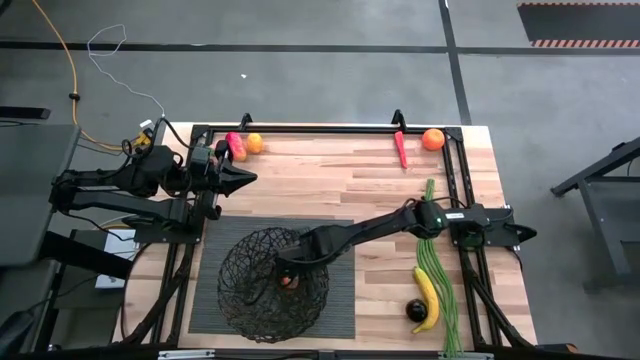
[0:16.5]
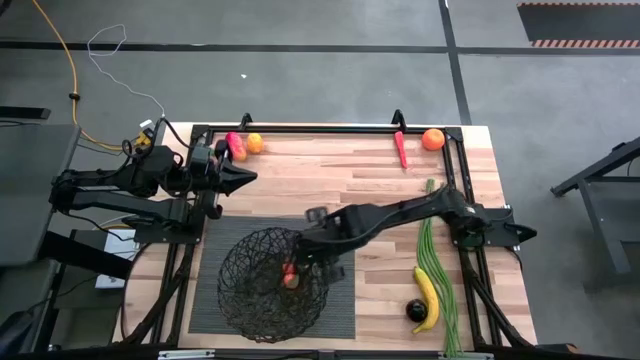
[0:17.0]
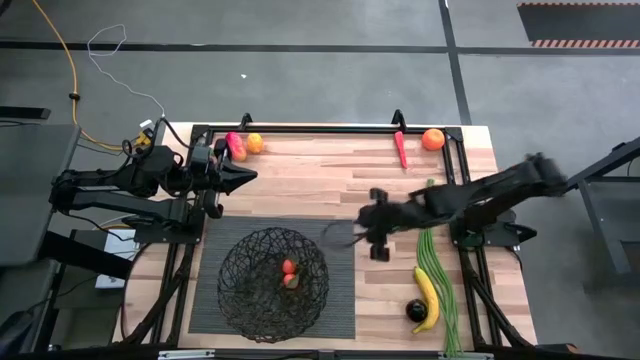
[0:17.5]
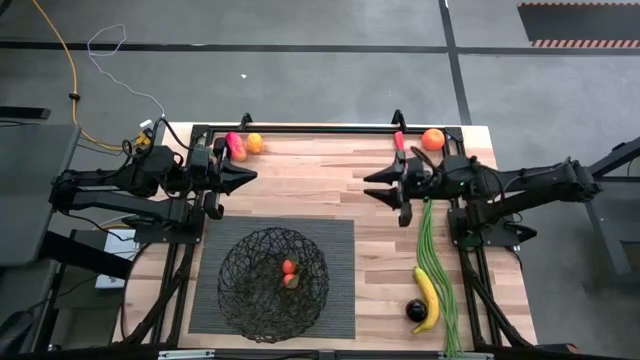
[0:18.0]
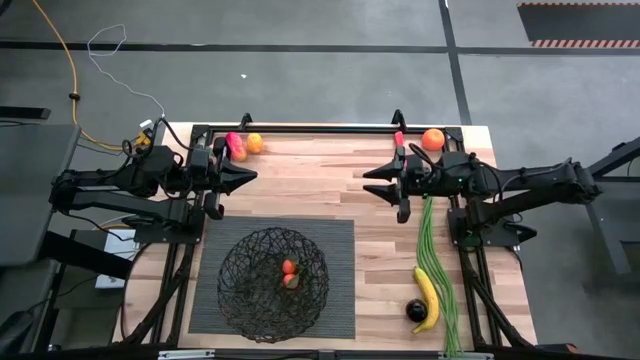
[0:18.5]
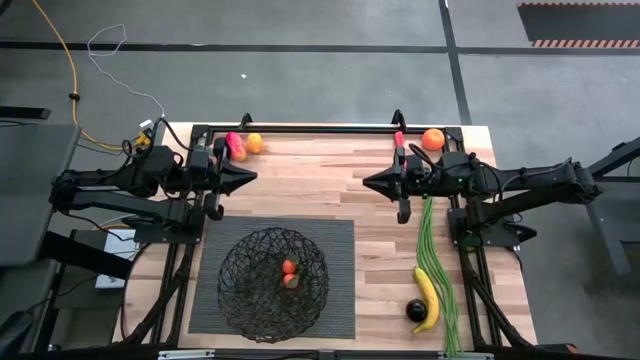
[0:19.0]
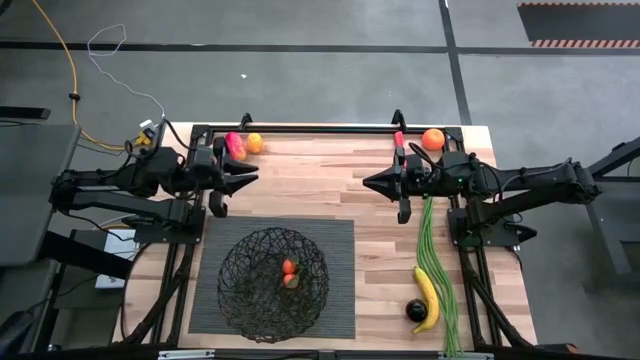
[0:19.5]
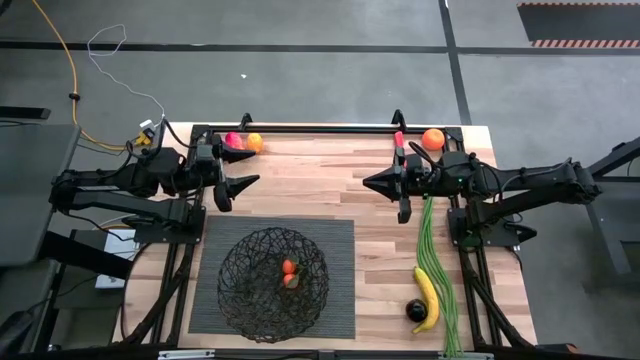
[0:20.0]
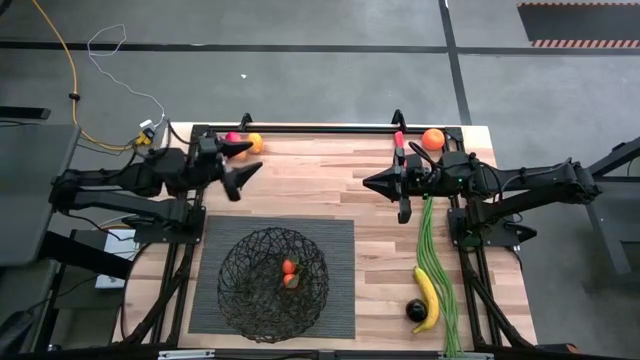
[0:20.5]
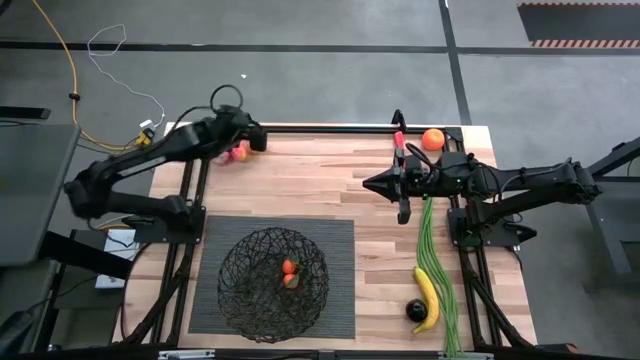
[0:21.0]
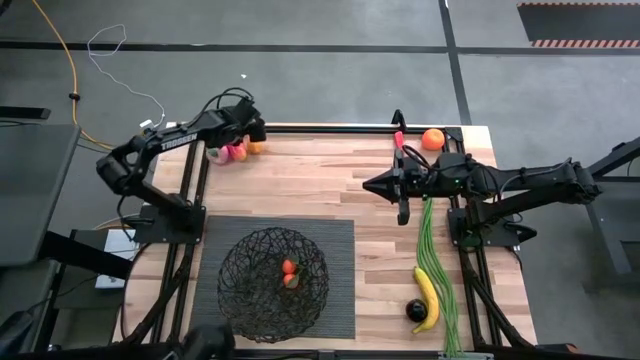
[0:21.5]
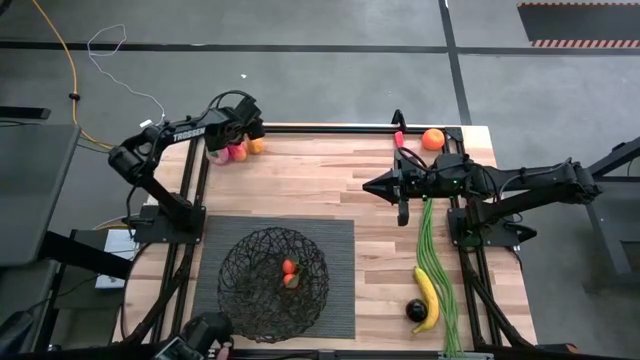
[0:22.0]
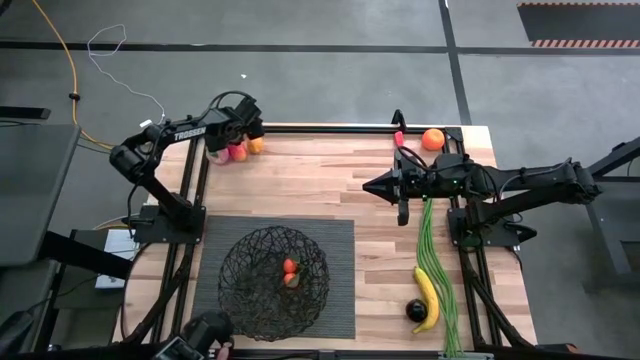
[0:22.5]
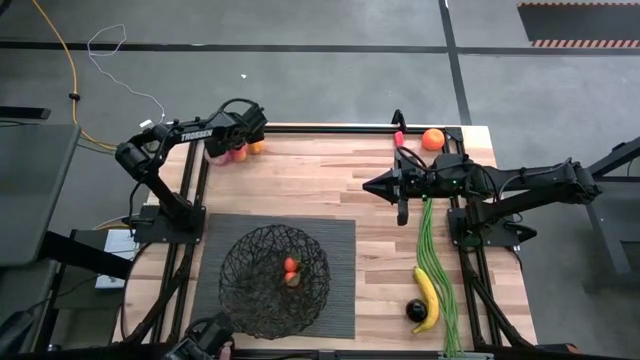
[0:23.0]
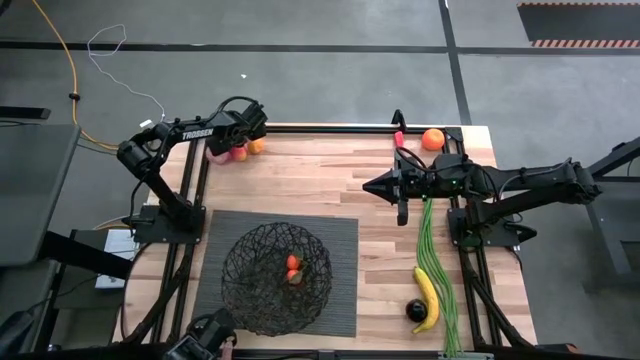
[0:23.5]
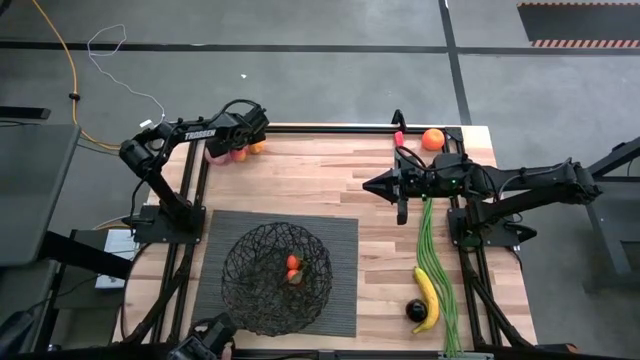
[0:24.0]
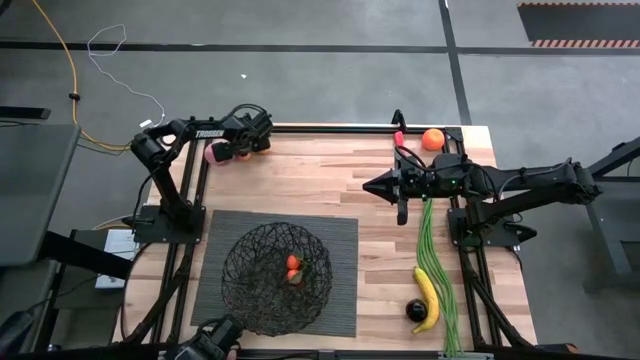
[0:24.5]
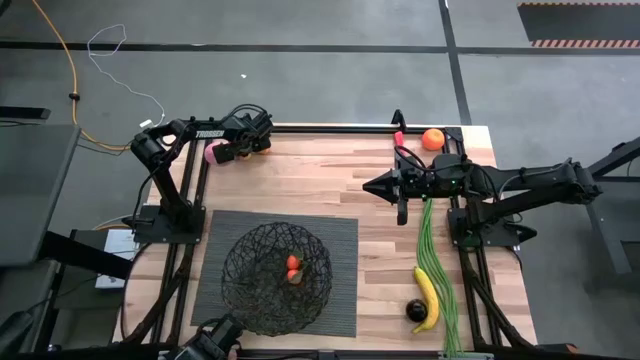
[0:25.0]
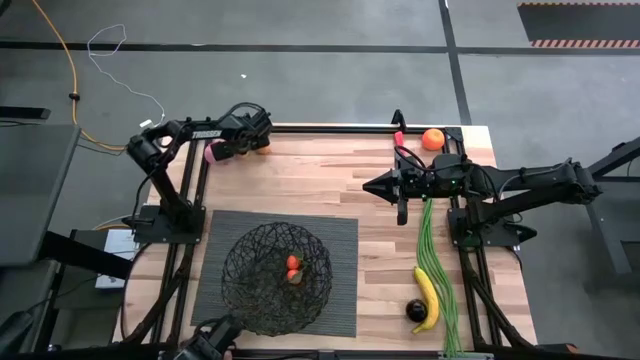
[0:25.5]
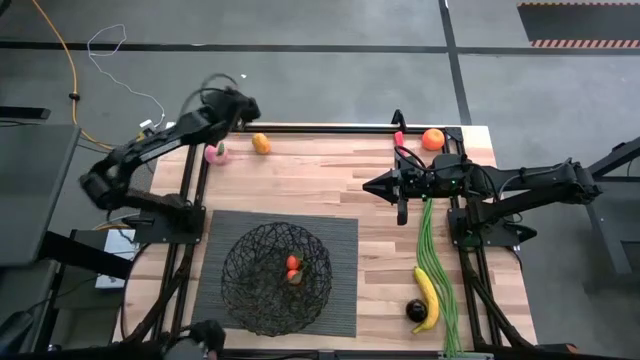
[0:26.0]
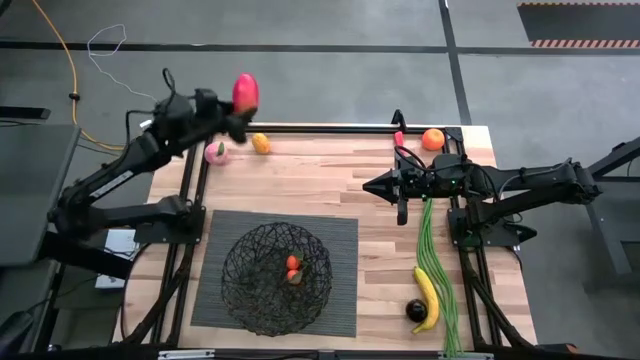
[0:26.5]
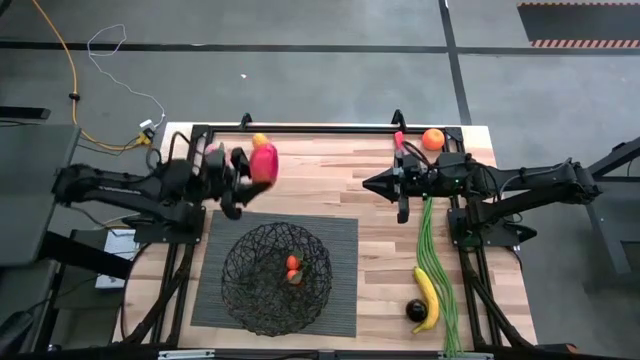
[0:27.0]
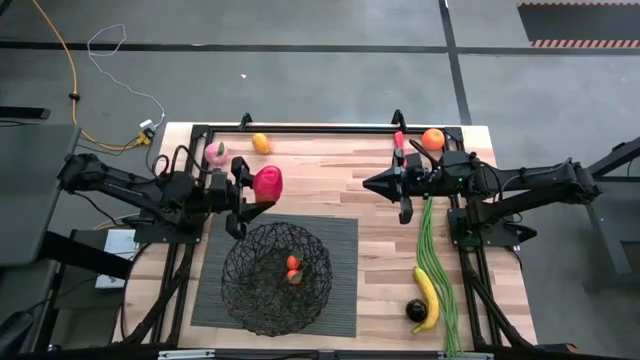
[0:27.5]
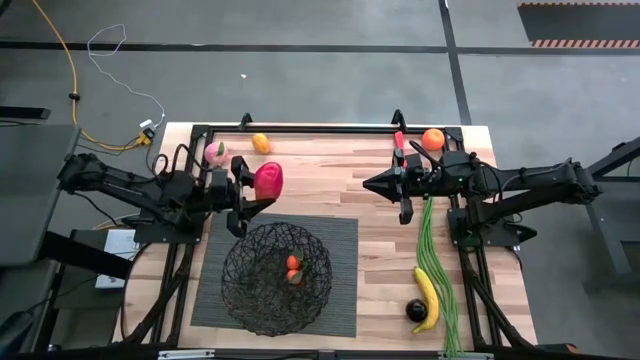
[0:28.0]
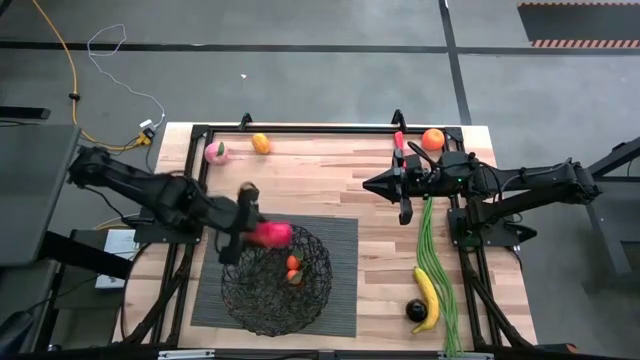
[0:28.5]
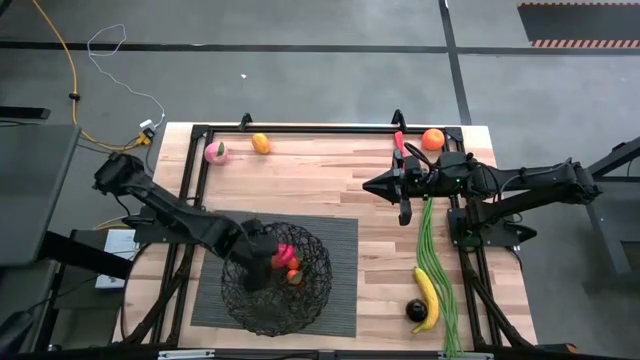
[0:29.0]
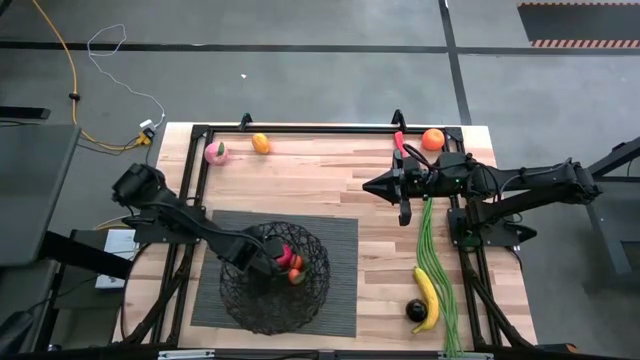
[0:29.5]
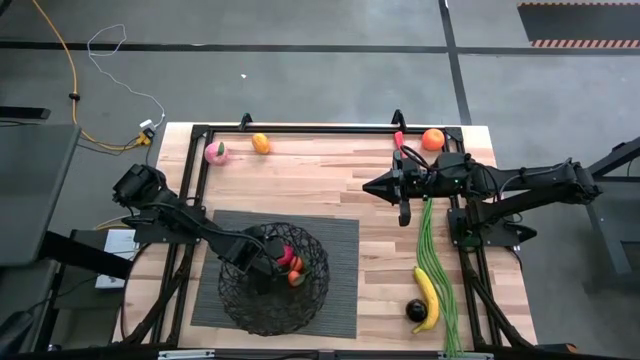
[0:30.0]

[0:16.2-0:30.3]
Task: Build produce basket
Put the red mango into the black wire basket

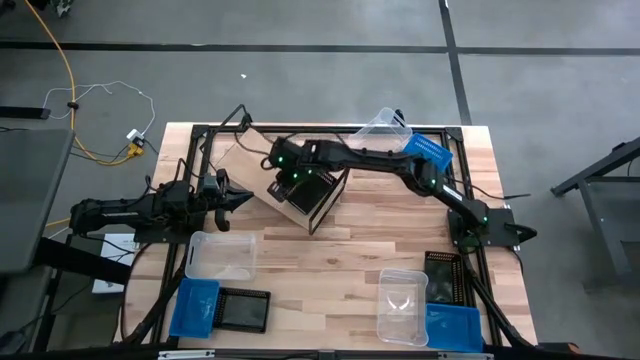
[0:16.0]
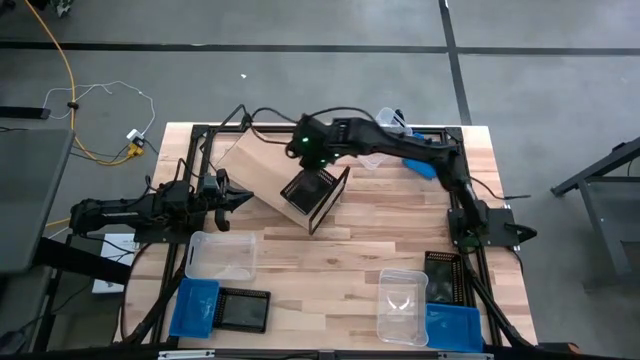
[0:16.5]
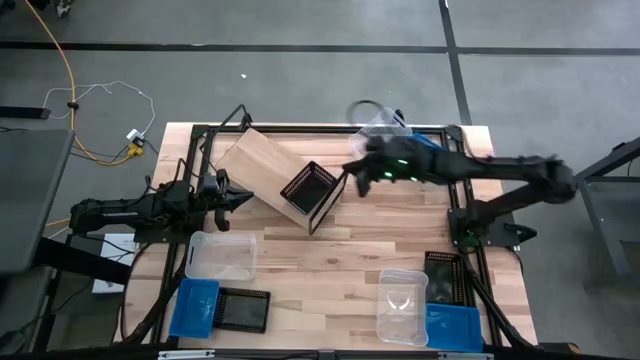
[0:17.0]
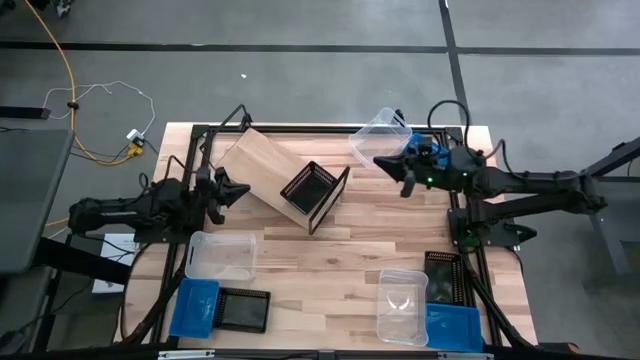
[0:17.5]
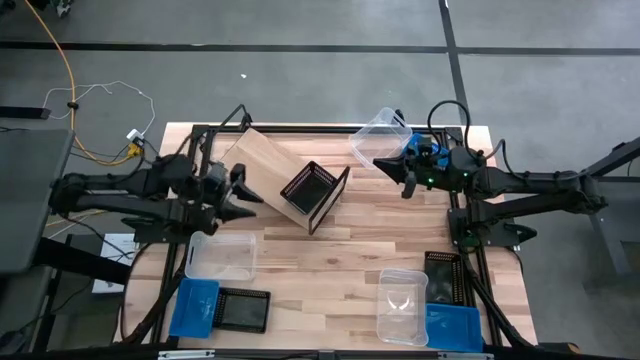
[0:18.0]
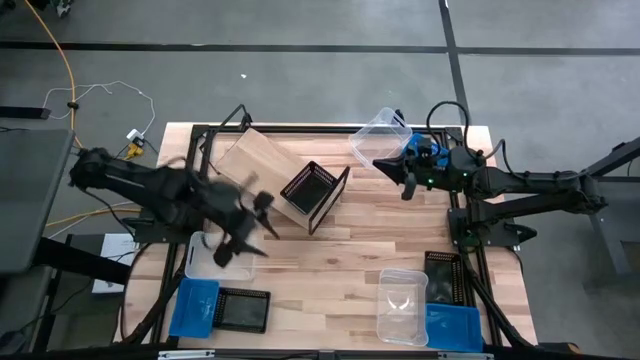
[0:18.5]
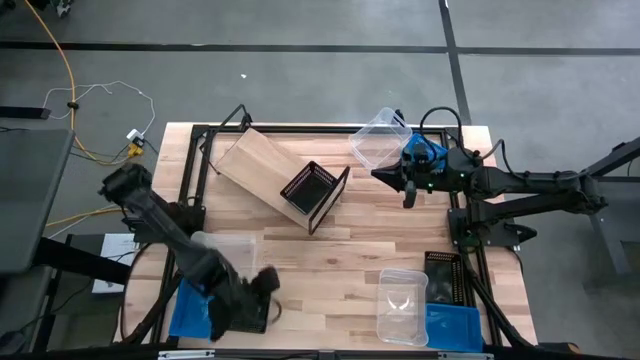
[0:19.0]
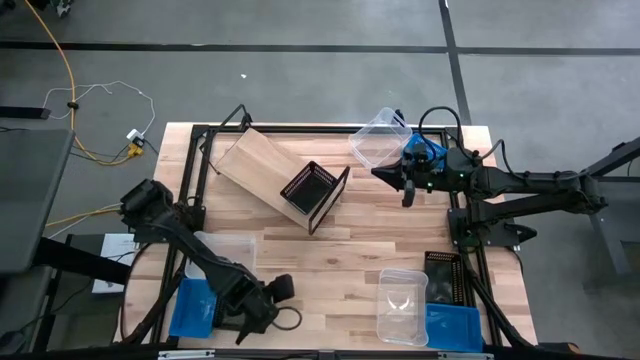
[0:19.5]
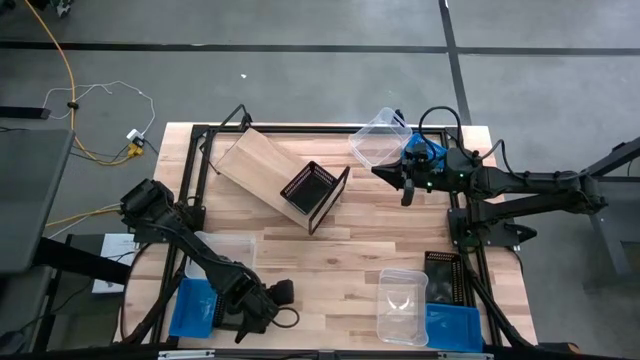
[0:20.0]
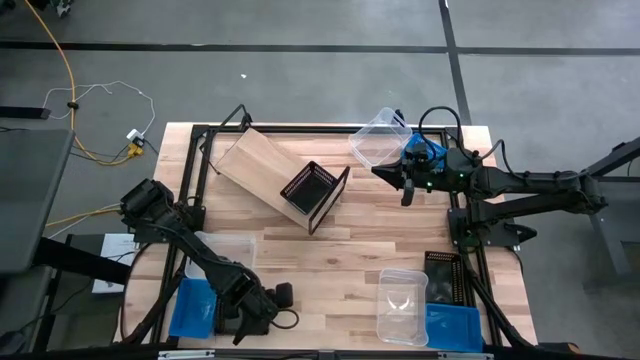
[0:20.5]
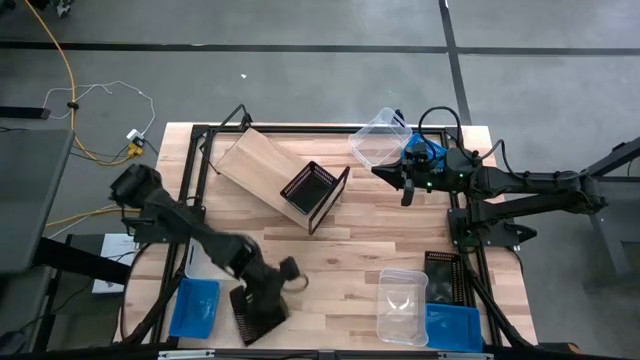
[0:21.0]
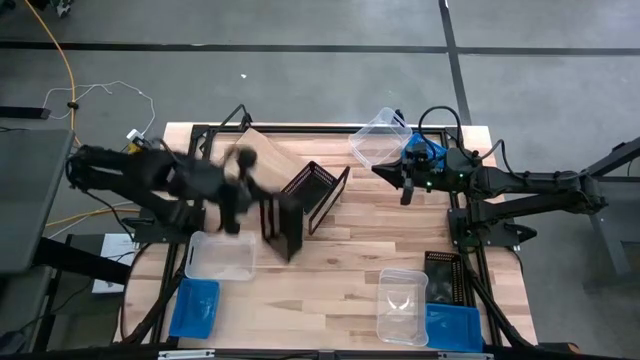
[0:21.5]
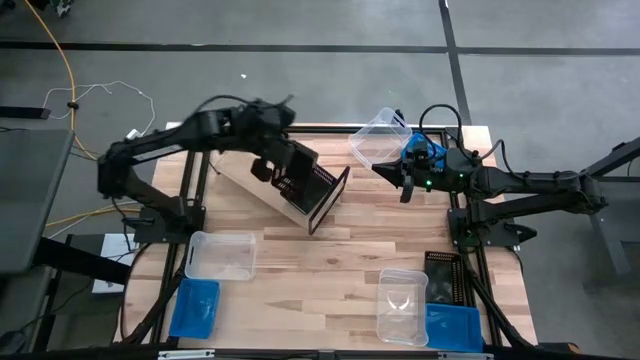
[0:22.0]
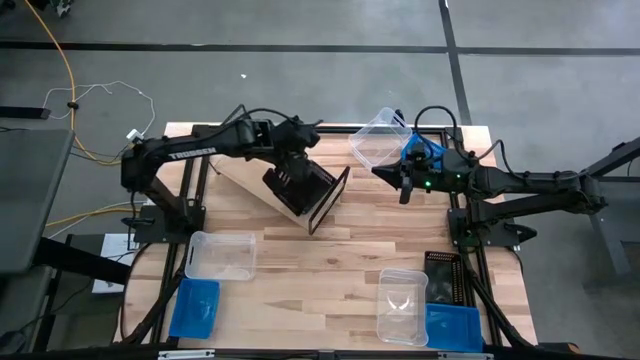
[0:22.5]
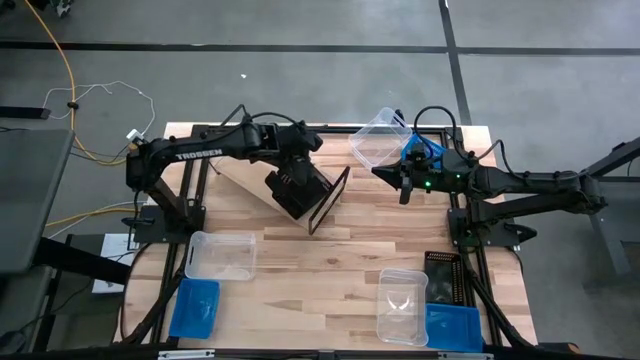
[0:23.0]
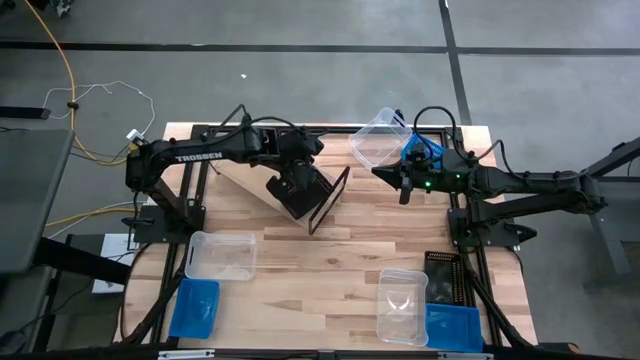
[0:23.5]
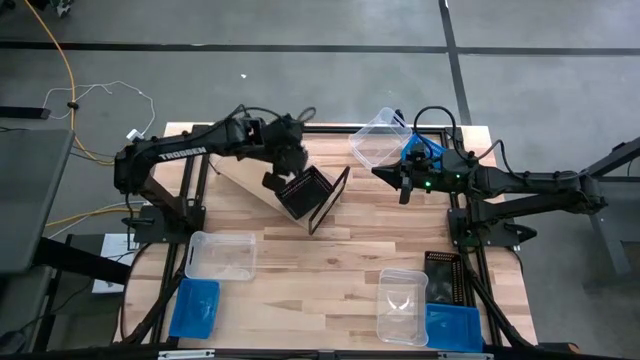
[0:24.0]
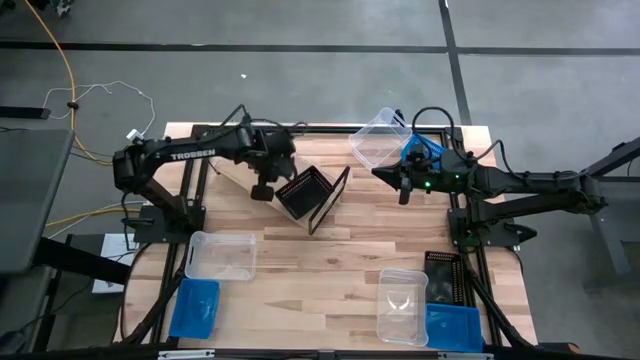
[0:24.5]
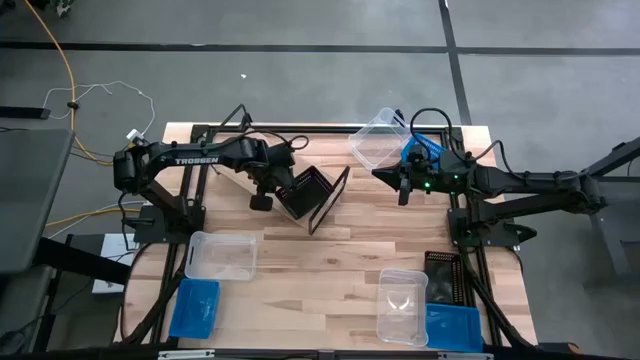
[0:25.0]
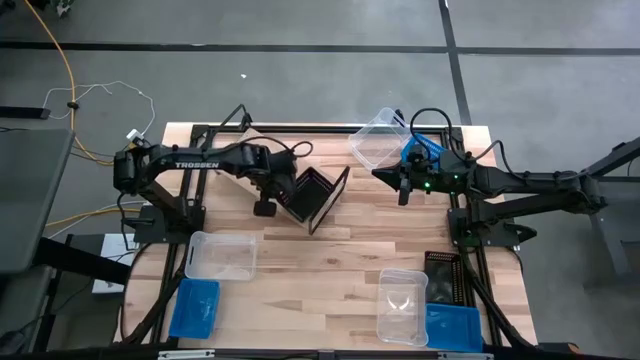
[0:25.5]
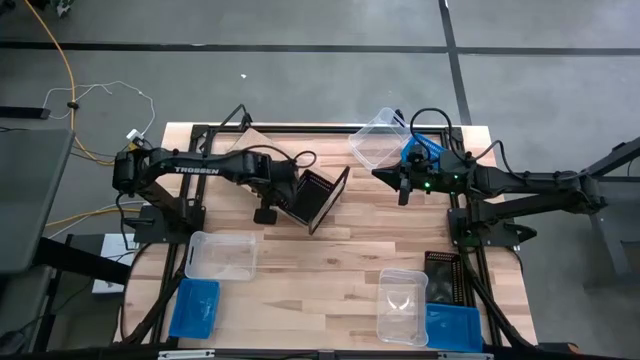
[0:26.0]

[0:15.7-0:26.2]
Task: Stack baskets on shelf by color
Stack the left black bin on top of the other black bin on the shelf
